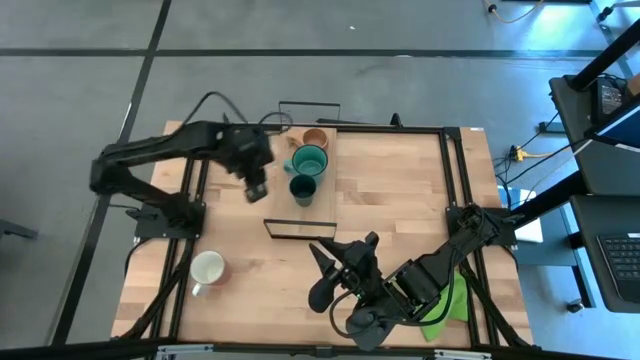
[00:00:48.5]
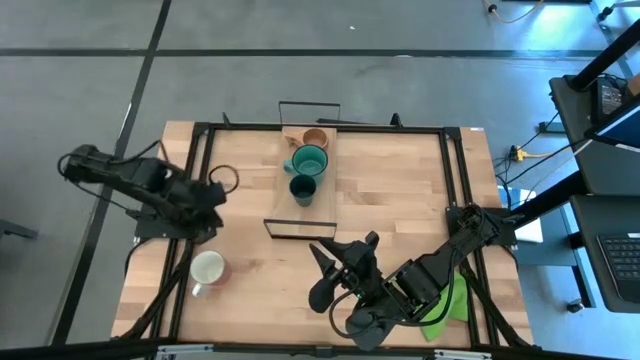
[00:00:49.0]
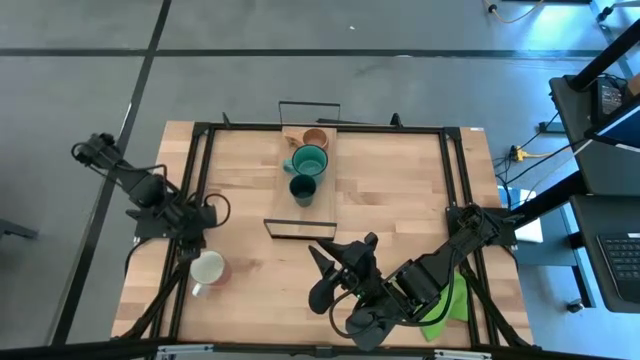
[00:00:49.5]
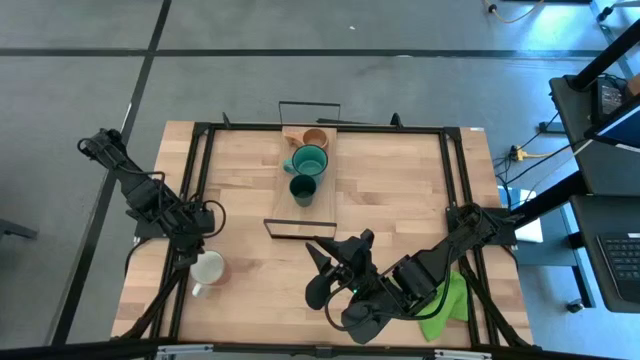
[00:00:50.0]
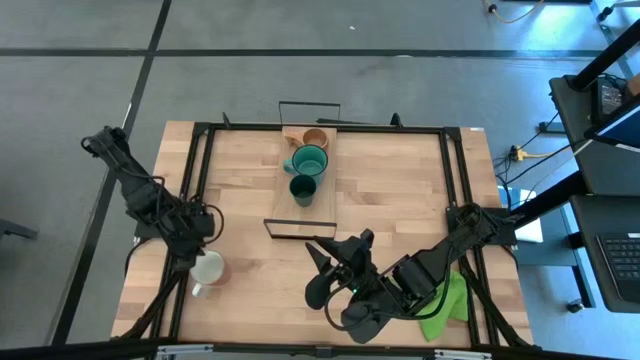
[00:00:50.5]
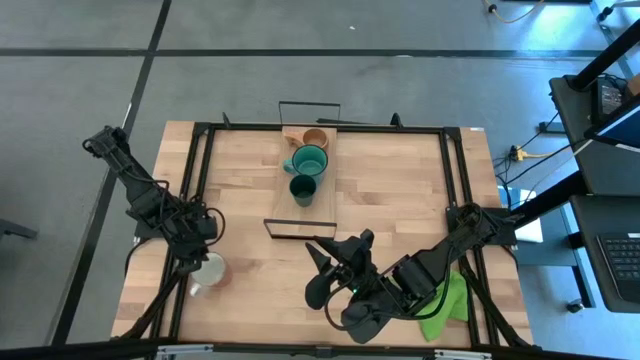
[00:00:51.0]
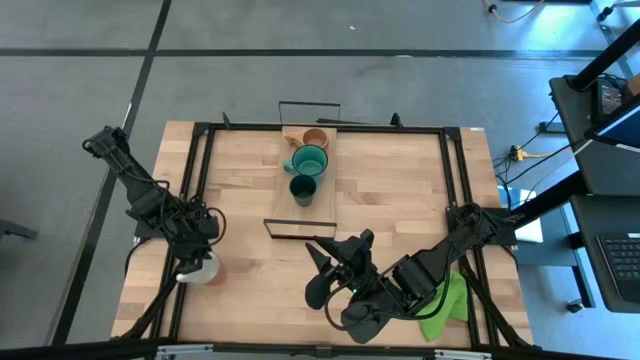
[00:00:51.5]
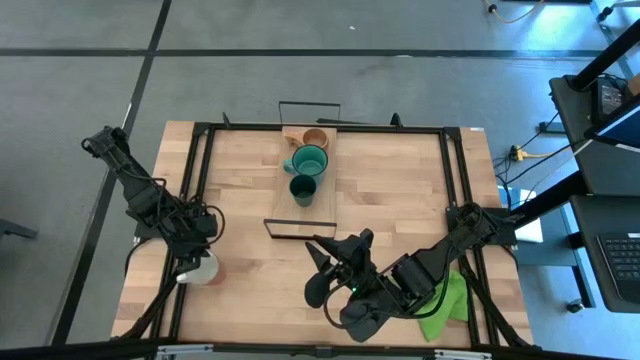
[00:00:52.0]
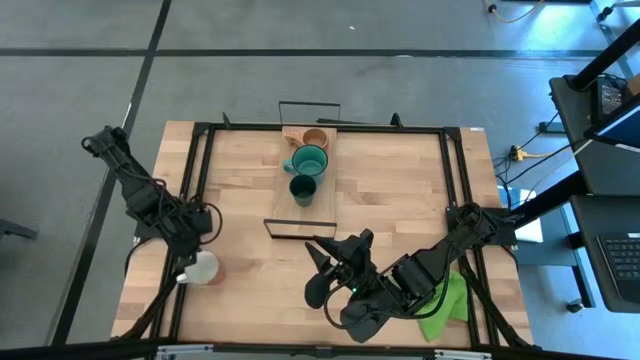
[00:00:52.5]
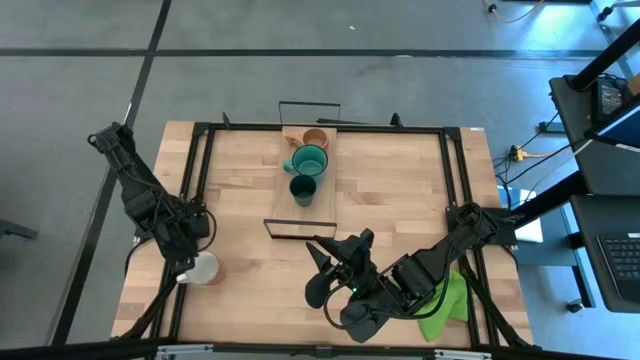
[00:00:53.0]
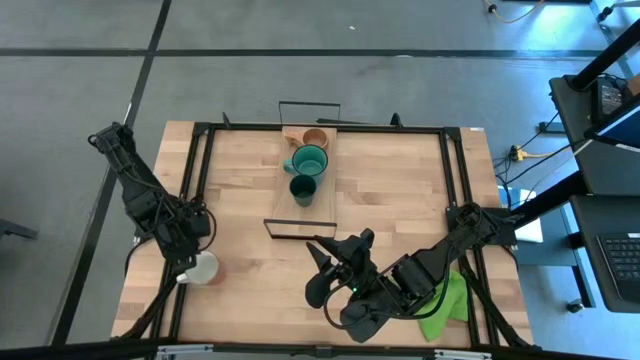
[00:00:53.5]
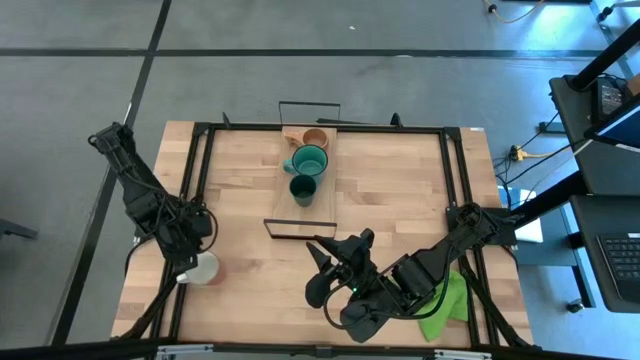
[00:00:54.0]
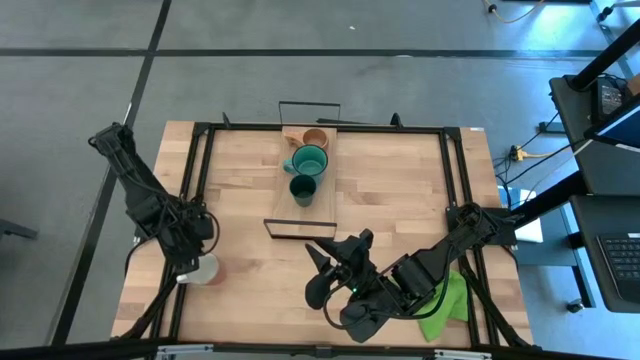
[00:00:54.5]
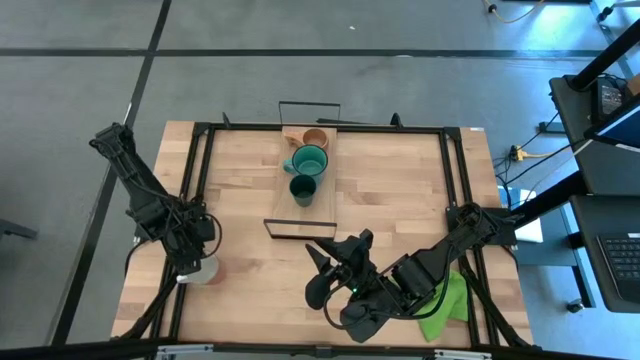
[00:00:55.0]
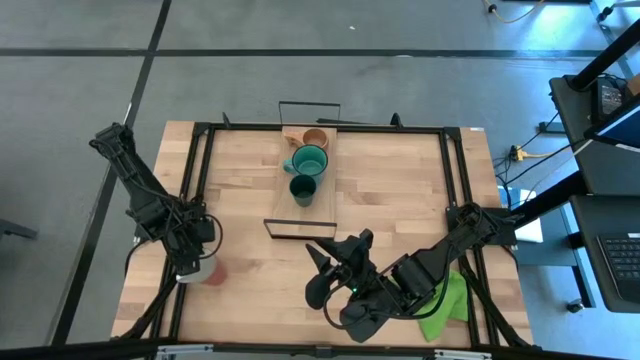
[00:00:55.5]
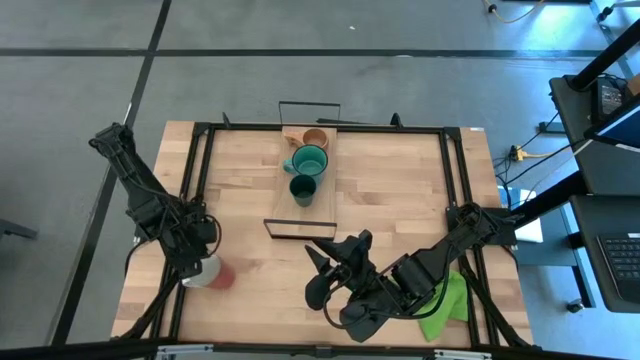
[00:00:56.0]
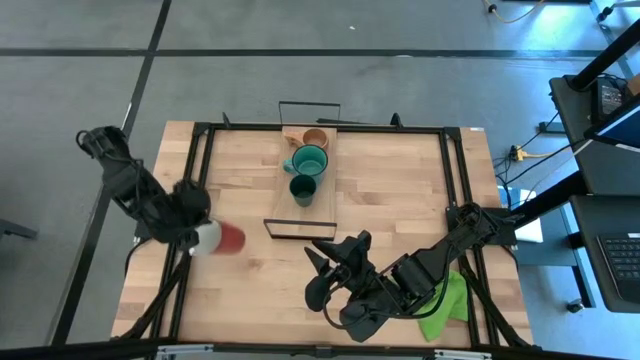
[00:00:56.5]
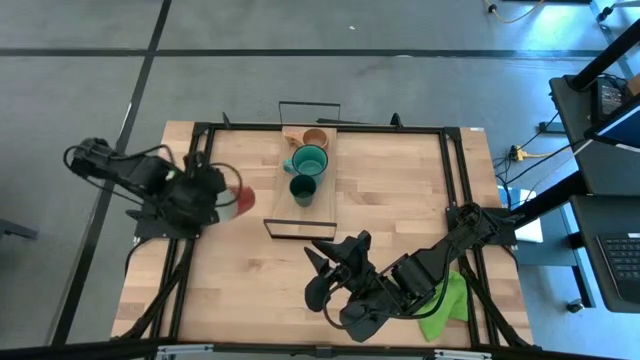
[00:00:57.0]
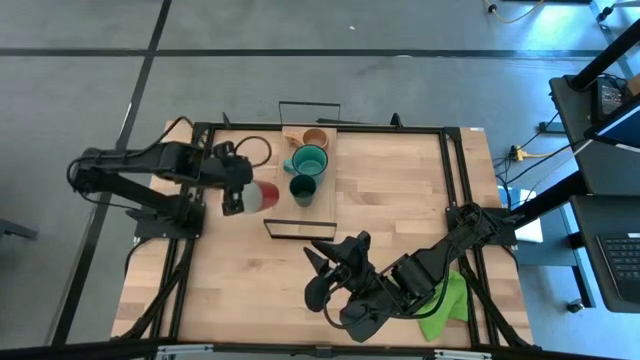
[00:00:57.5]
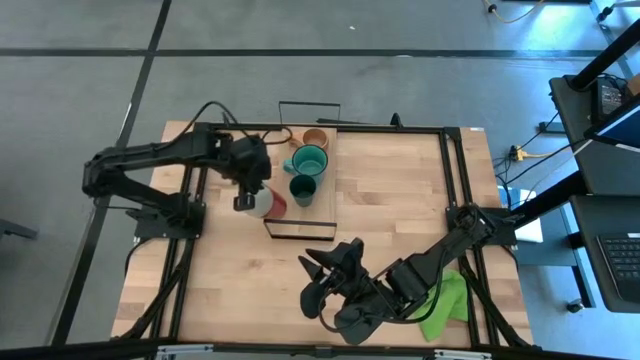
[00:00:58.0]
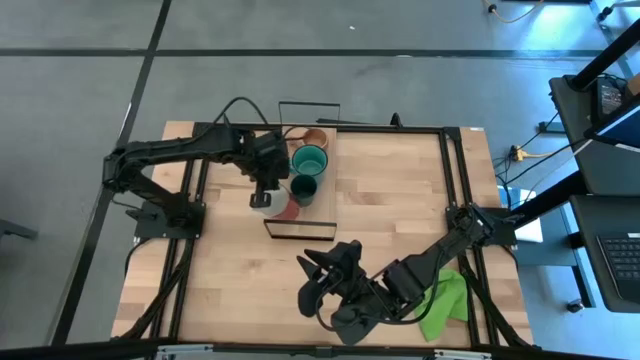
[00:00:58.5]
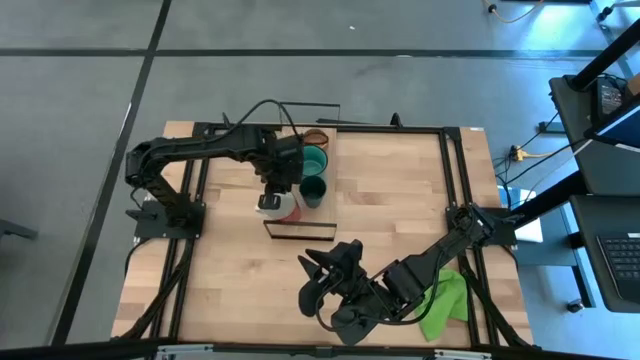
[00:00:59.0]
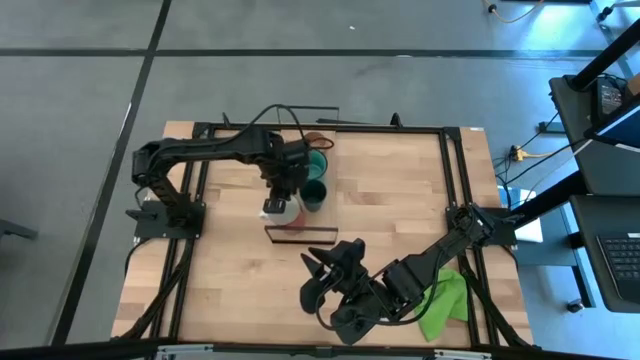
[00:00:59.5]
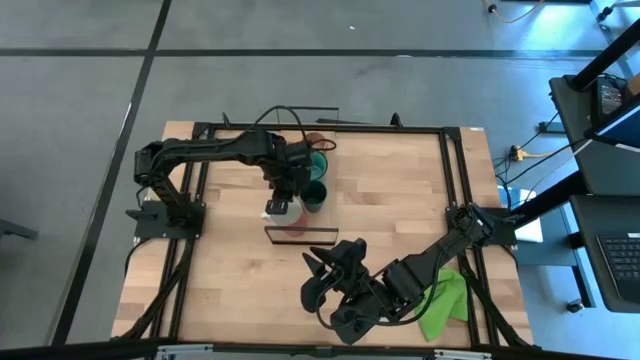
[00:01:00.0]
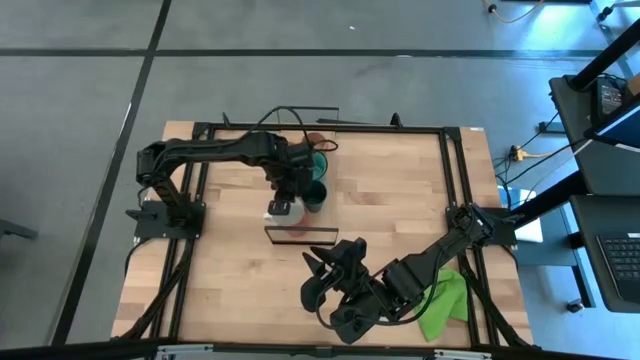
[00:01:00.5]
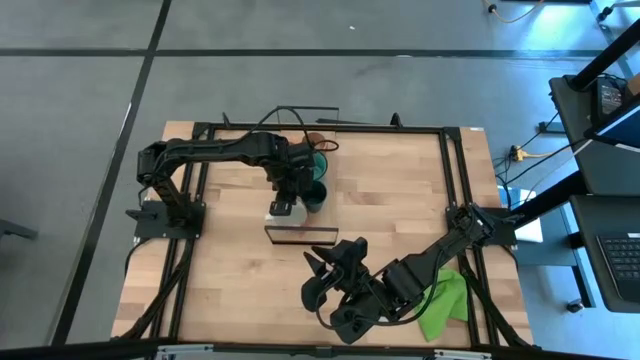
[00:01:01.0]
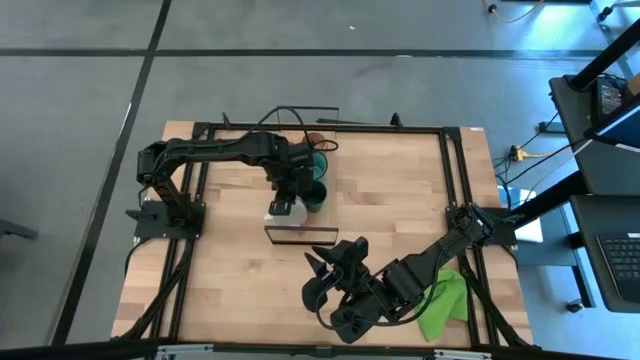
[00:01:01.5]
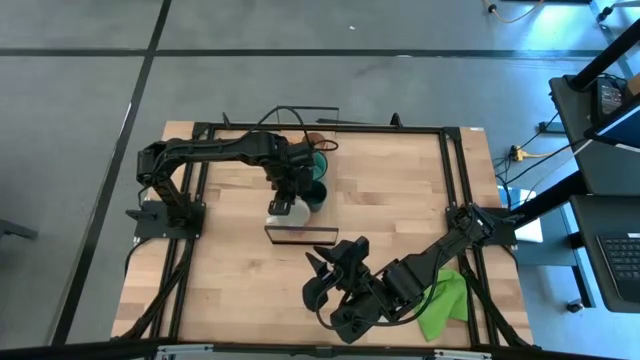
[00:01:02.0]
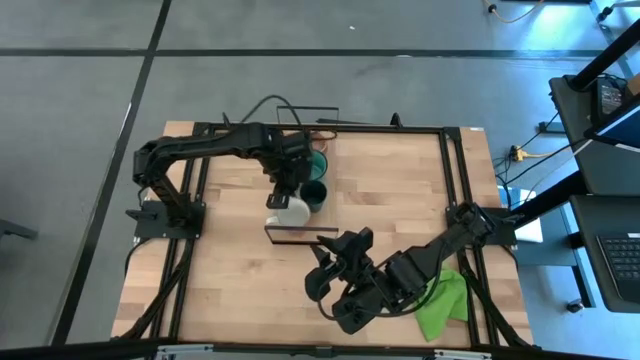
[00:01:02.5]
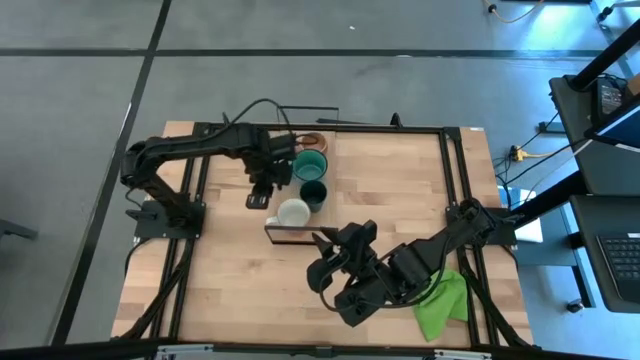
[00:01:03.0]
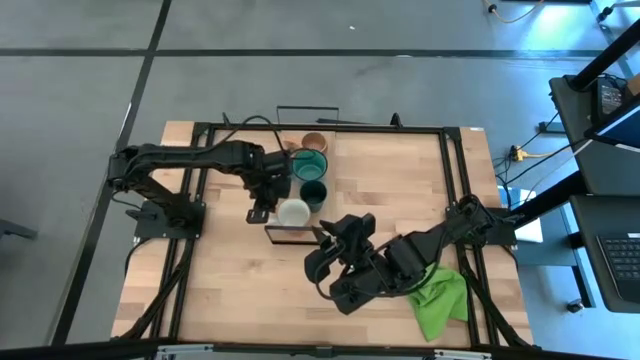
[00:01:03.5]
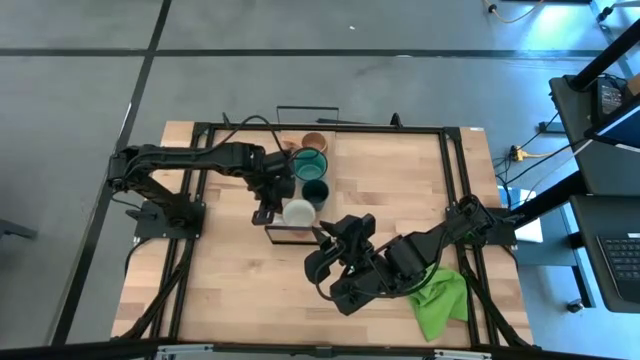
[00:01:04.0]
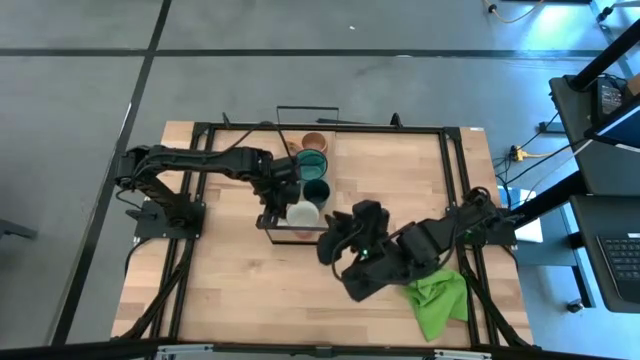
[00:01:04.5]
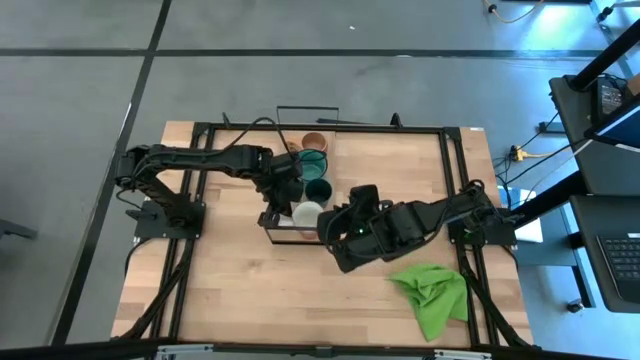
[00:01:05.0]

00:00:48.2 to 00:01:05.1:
Task: Stack small to large cups/mugs on shelf
Put the orange mug on the shelf

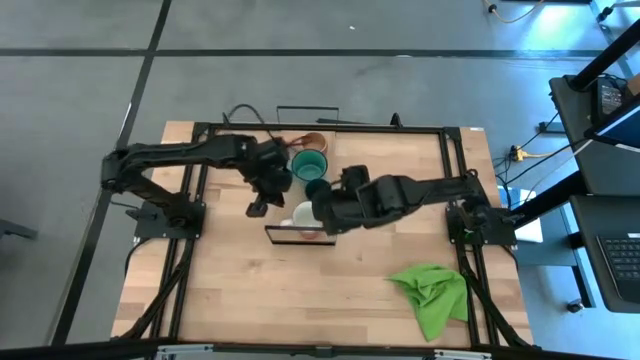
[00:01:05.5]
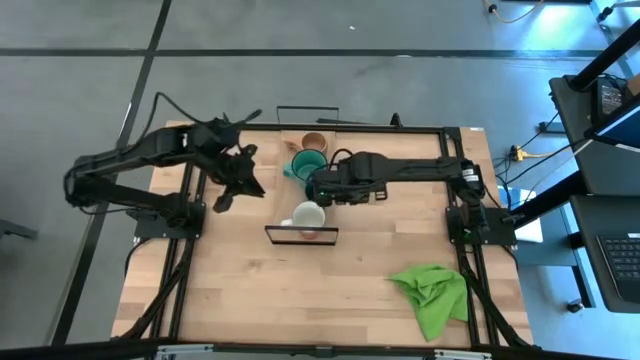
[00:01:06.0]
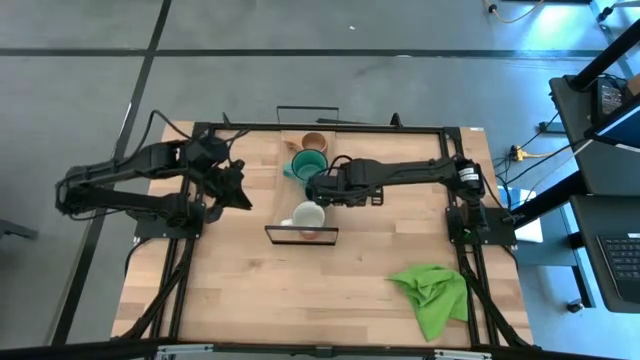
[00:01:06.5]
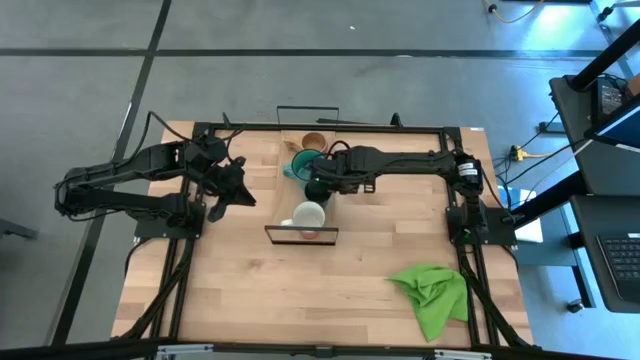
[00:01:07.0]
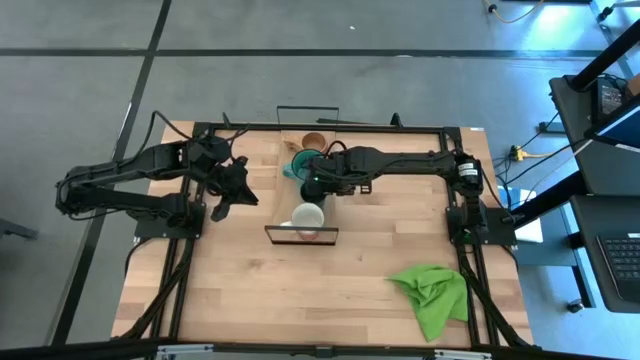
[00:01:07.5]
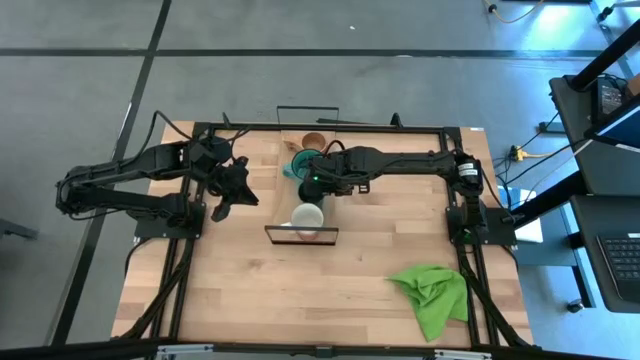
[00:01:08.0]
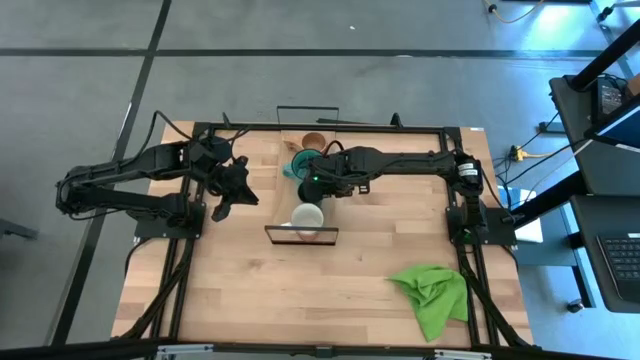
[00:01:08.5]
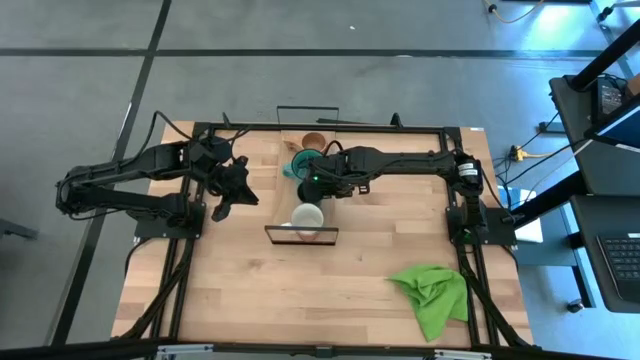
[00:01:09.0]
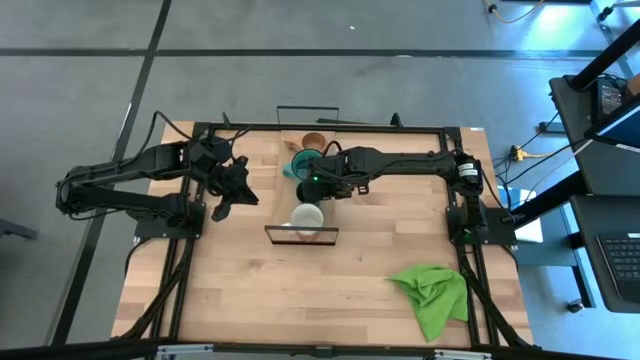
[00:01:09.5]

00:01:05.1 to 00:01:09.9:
Adjust the green cup on the shelf
